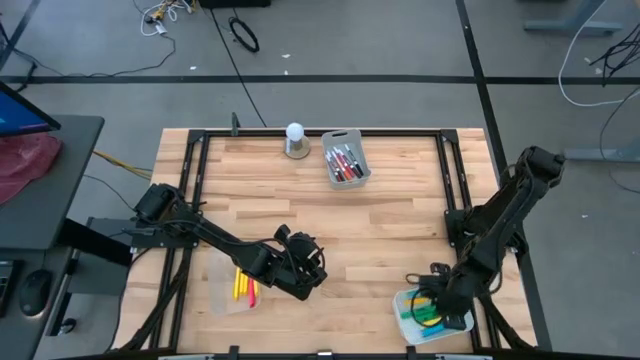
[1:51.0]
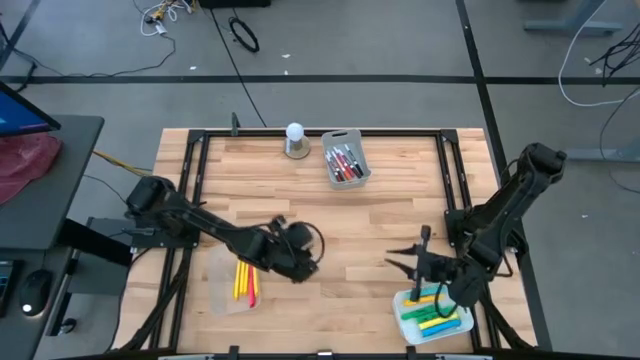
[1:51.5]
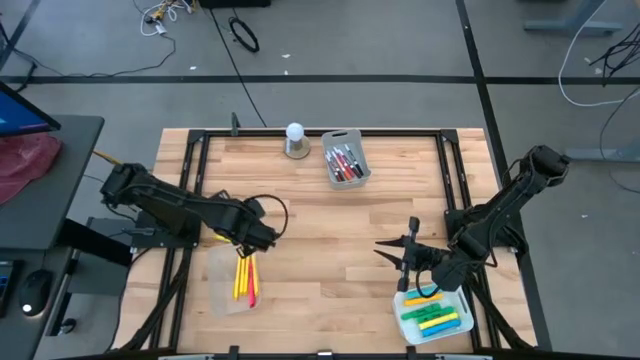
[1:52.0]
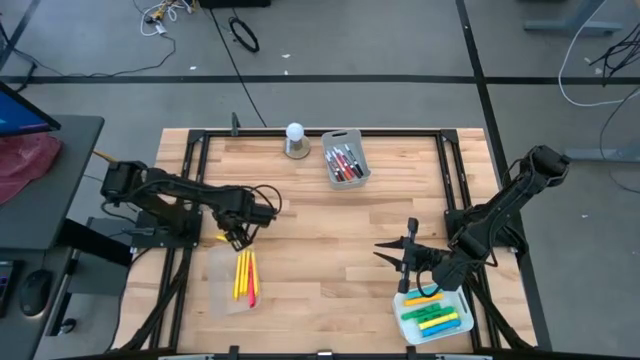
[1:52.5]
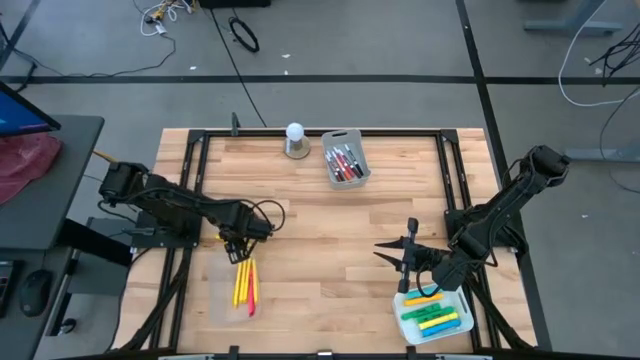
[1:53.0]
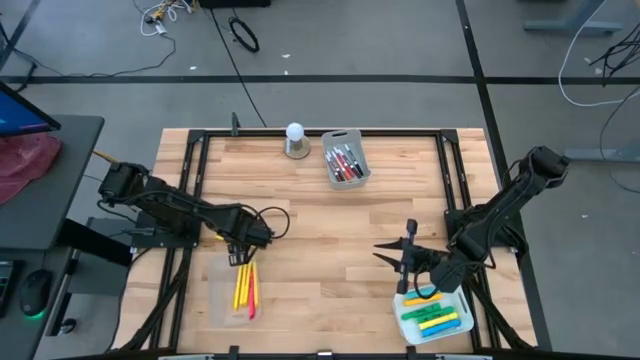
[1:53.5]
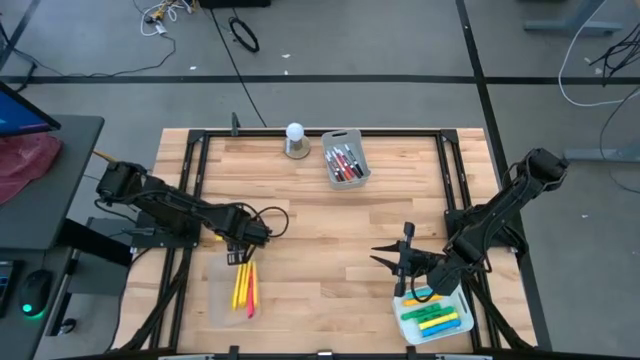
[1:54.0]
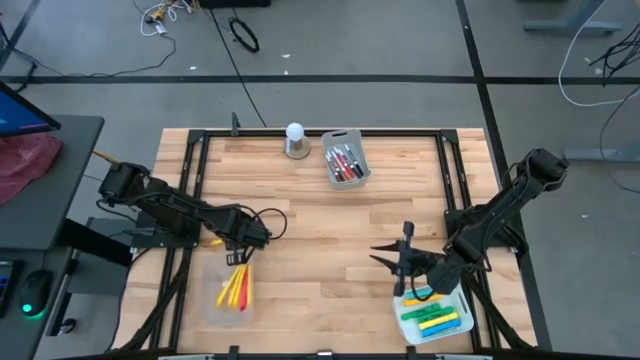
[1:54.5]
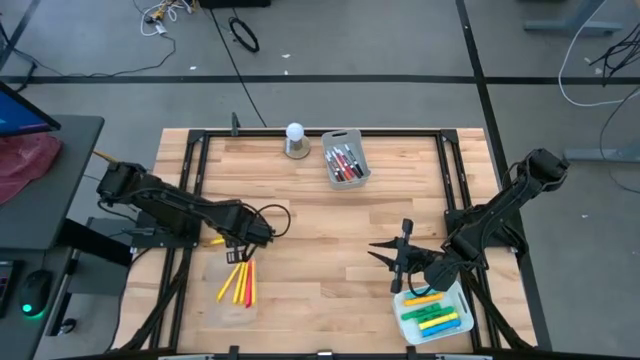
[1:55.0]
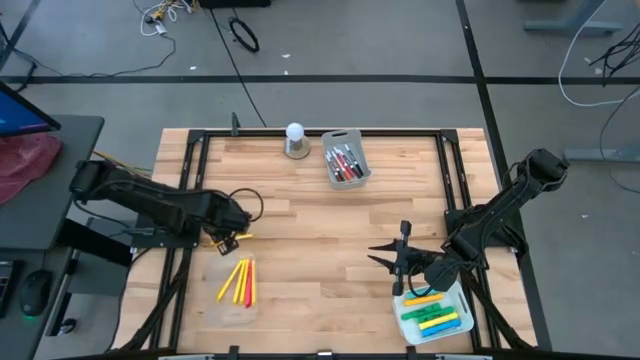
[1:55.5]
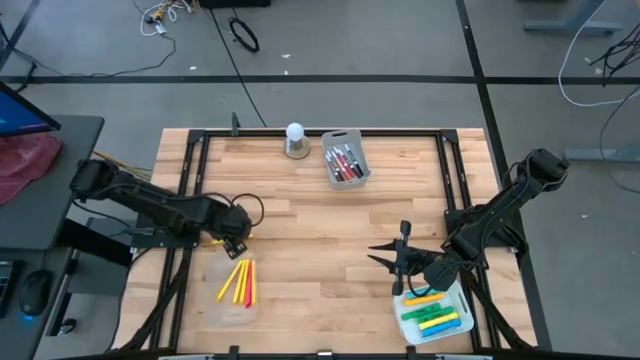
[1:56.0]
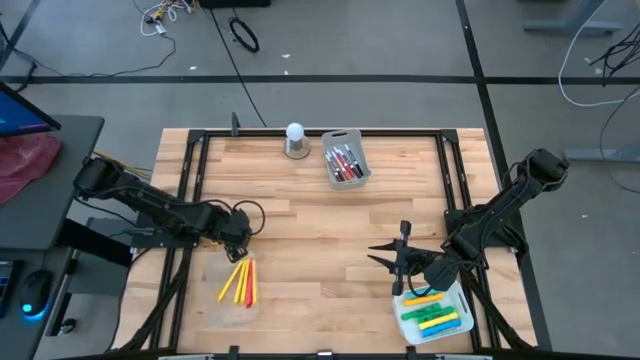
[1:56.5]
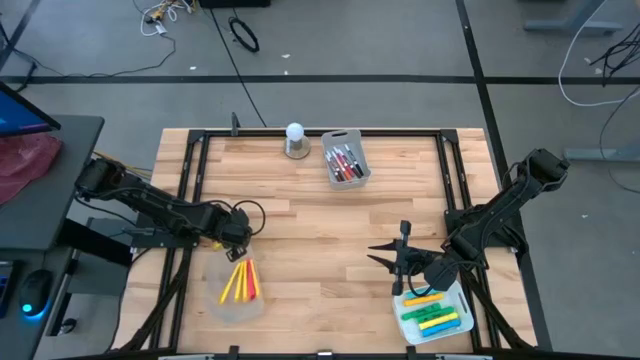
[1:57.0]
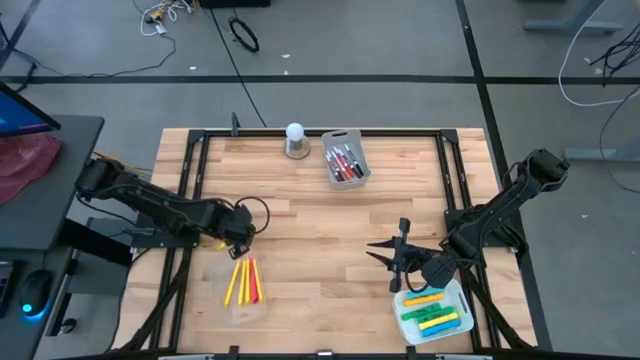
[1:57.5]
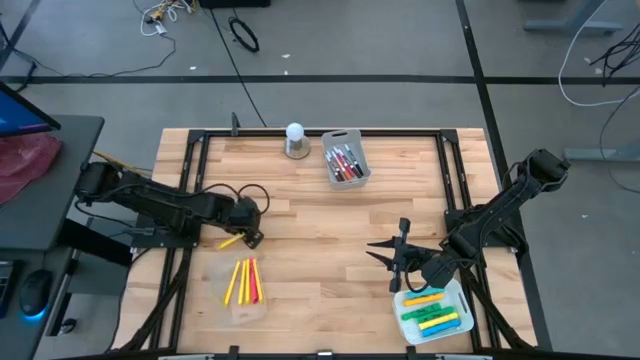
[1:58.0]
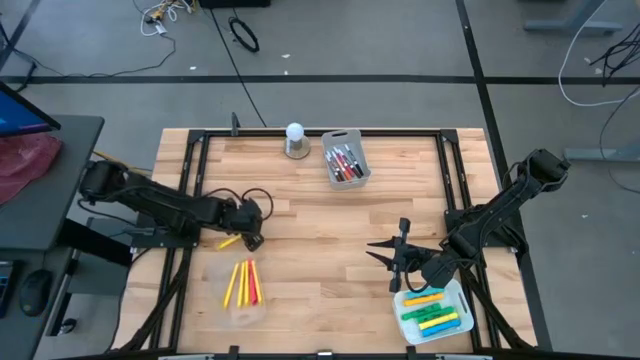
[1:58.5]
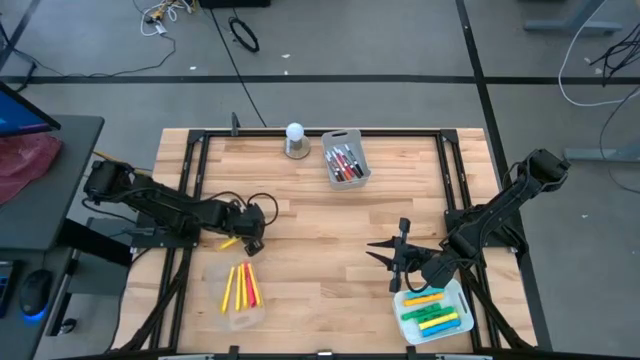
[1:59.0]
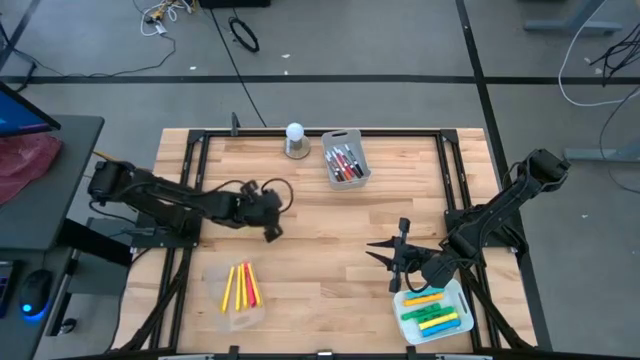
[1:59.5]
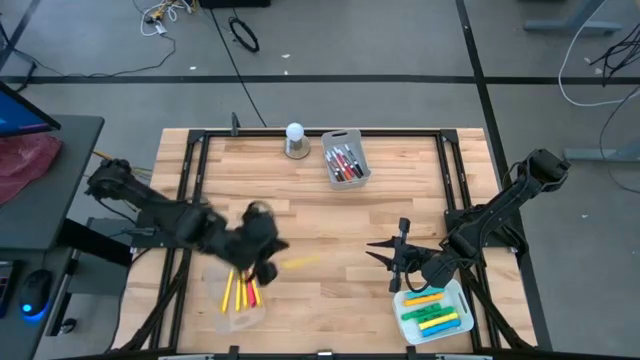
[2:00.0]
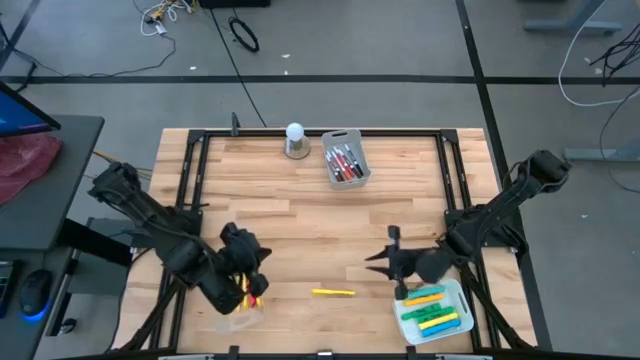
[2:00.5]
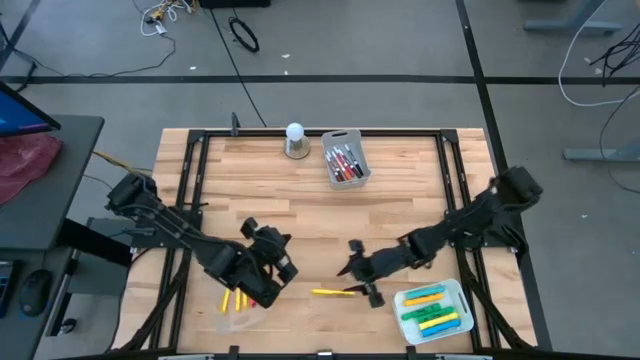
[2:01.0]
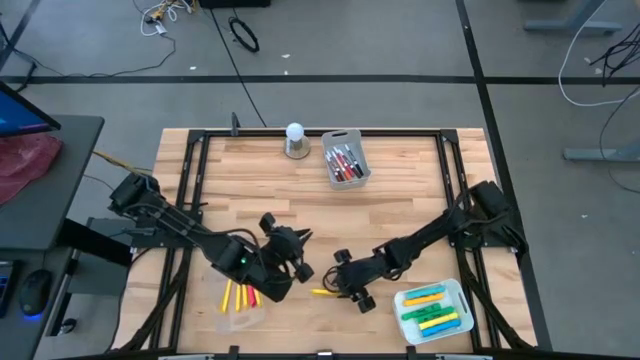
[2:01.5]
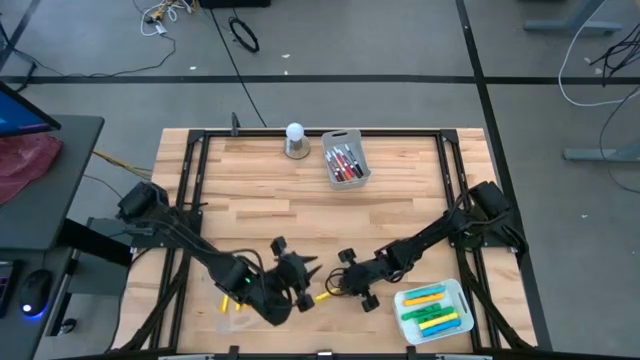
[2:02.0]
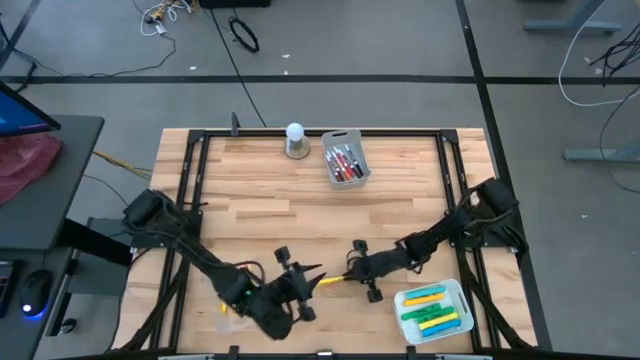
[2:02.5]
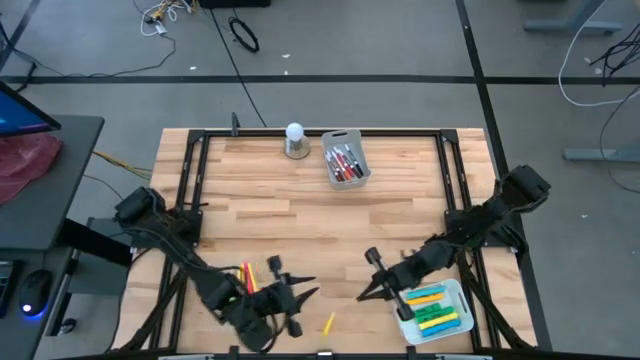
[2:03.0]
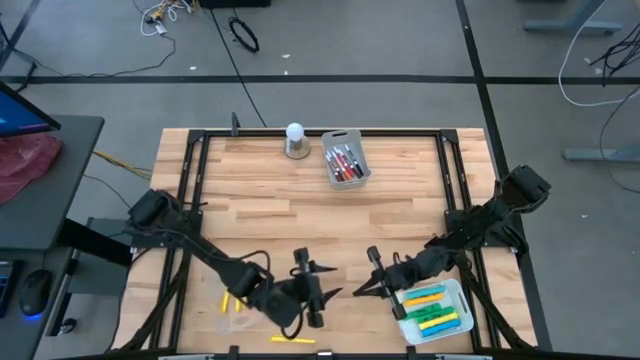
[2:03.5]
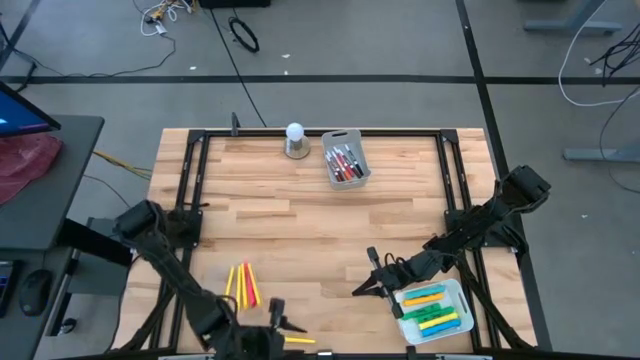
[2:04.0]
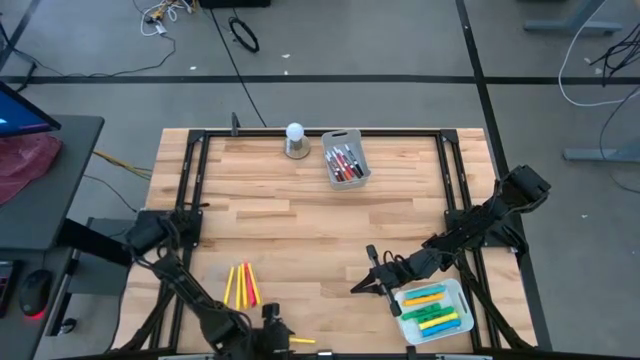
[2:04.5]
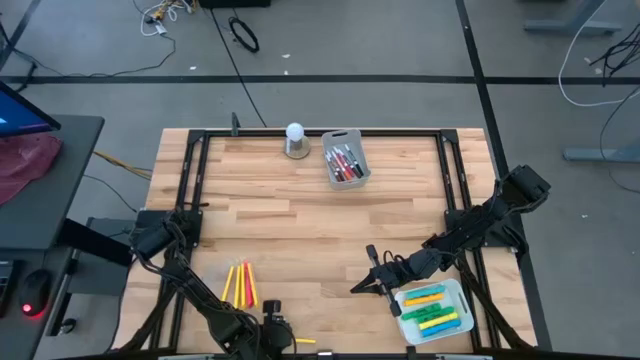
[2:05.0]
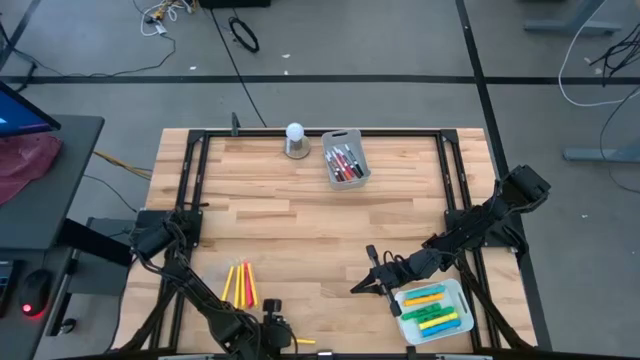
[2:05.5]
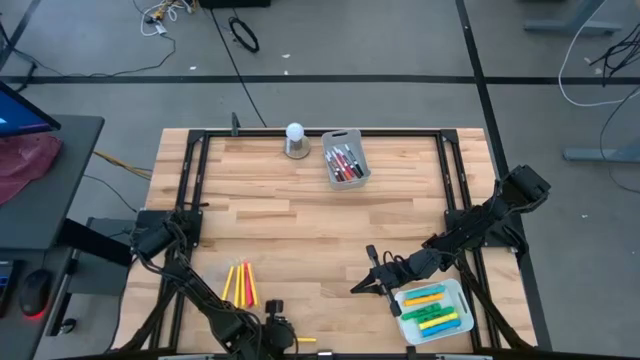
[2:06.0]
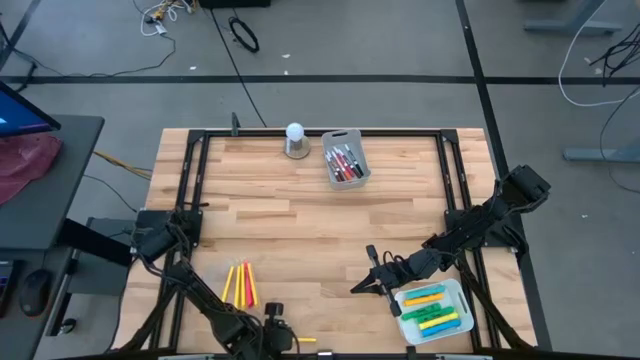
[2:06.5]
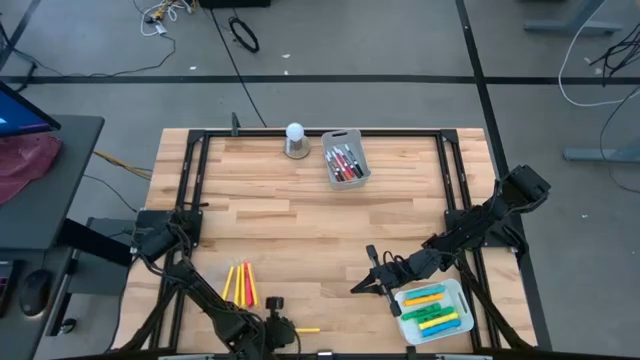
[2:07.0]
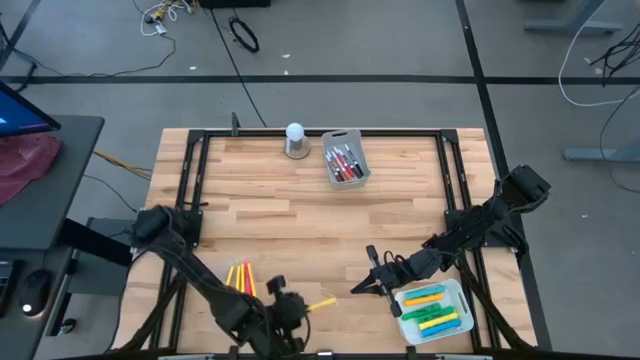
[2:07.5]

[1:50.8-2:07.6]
Task: Pick & Place Markers
Put the yellow pen into the transparent bin

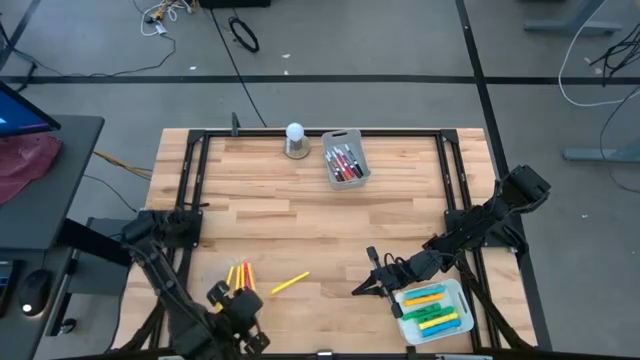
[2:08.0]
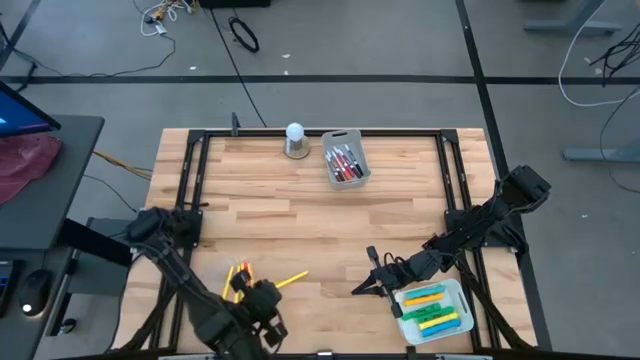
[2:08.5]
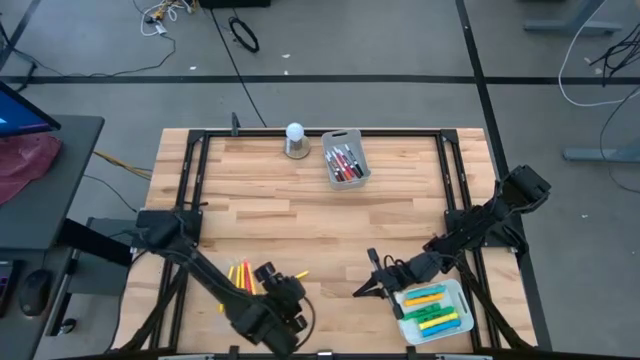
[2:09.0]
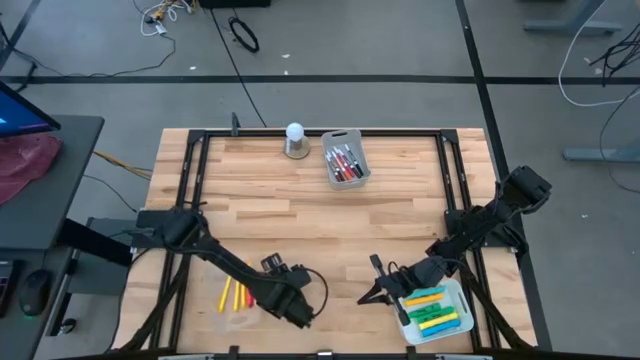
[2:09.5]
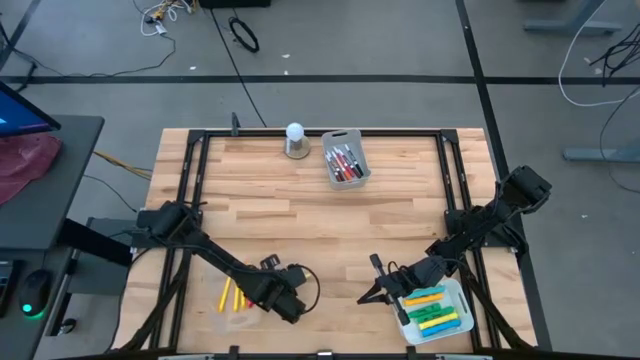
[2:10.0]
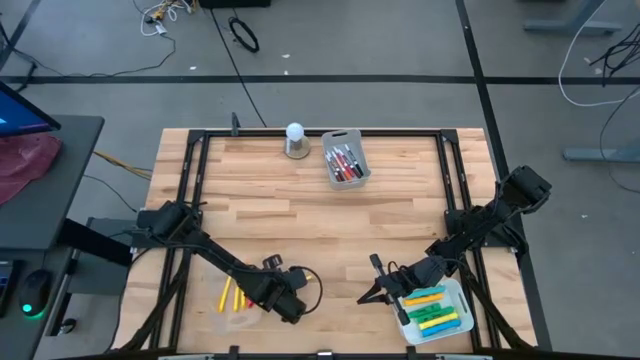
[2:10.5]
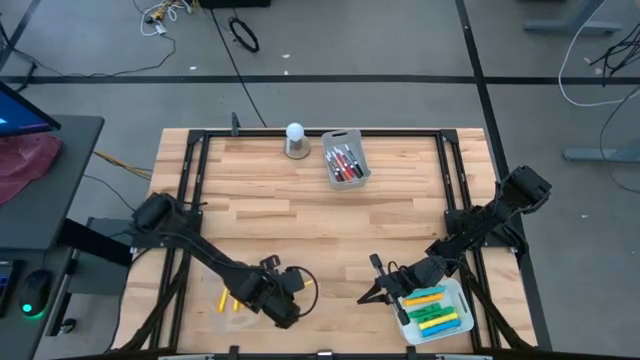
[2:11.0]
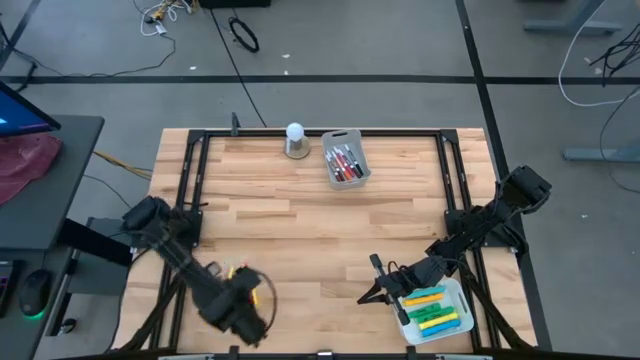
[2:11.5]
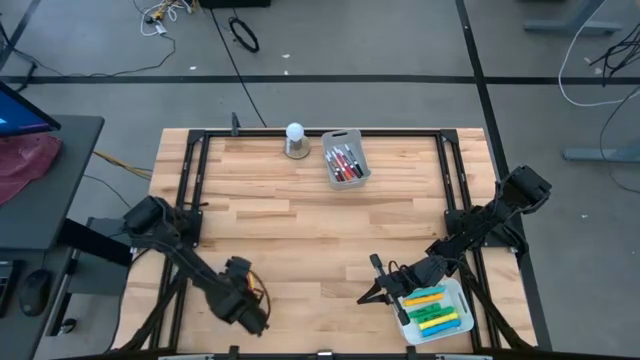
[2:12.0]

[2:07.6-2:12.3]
Put the yellow pen into the transparent bin

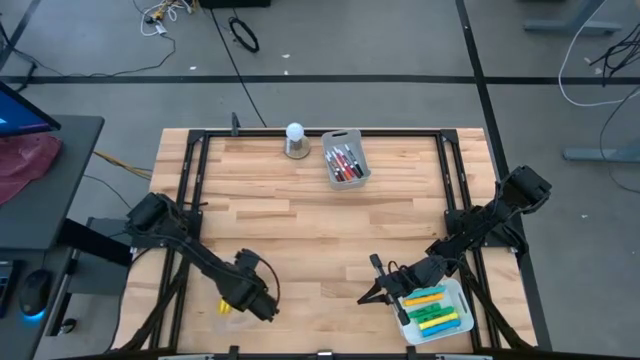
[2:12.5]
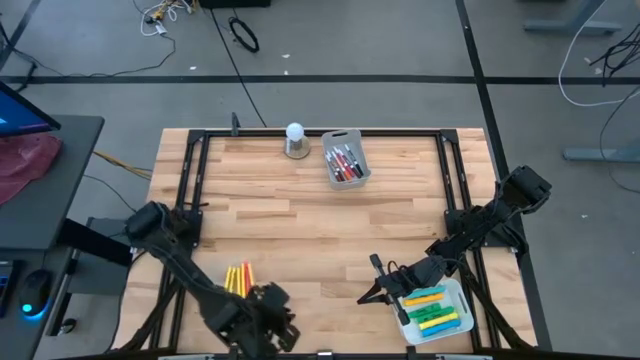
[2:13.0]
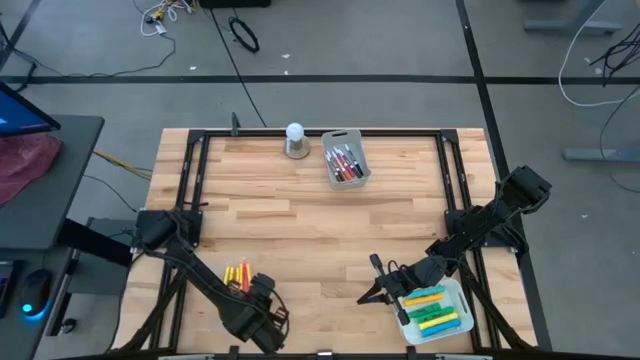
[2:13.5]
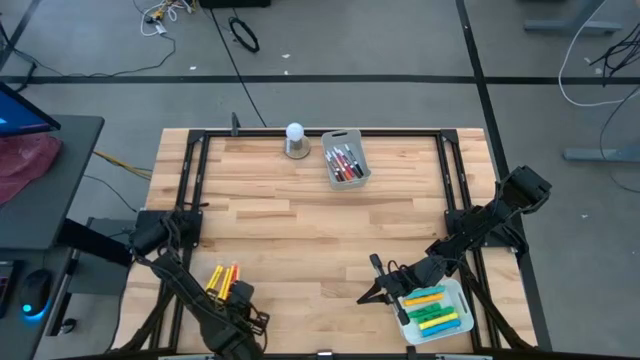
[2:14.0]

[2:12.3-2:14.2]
Adjust the transparent bin
